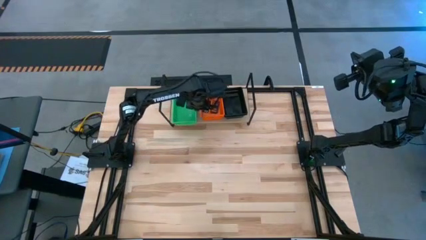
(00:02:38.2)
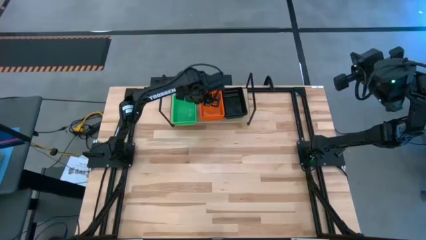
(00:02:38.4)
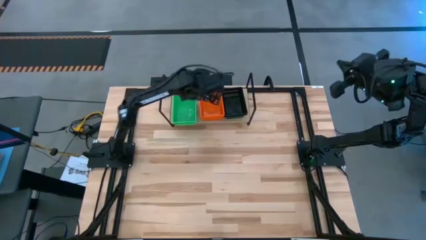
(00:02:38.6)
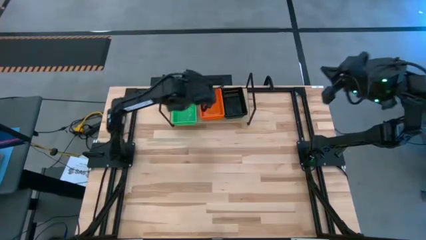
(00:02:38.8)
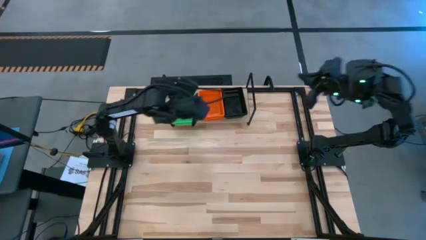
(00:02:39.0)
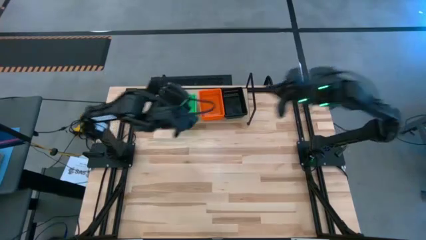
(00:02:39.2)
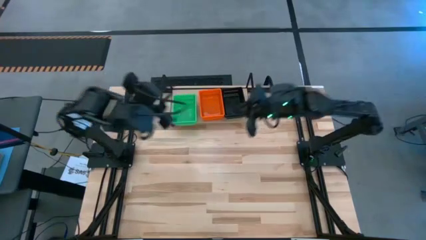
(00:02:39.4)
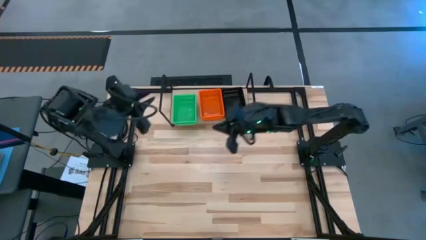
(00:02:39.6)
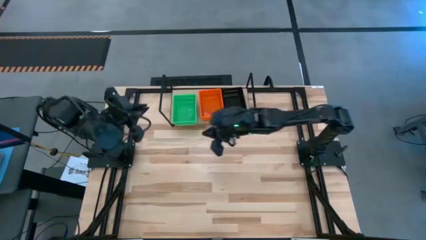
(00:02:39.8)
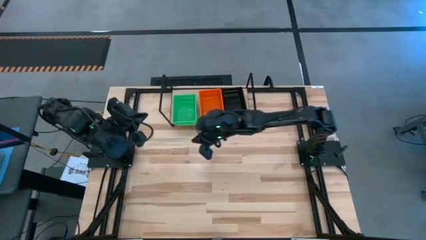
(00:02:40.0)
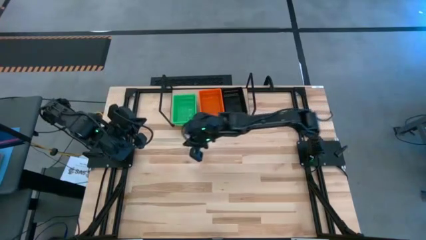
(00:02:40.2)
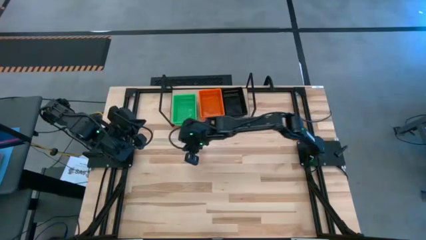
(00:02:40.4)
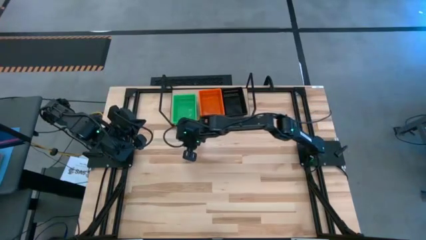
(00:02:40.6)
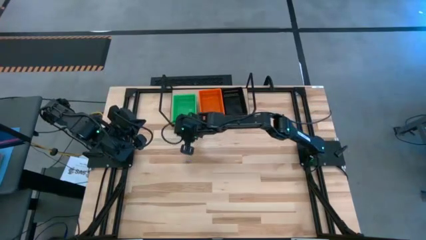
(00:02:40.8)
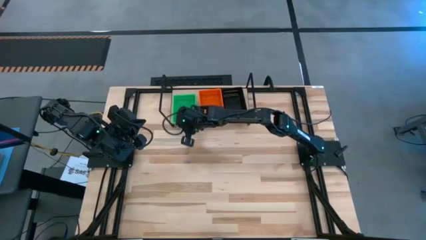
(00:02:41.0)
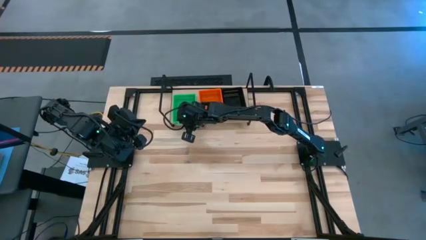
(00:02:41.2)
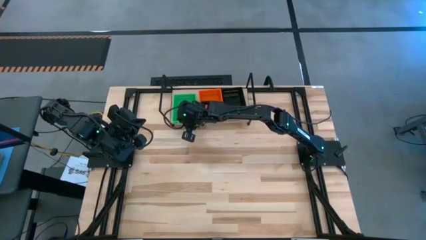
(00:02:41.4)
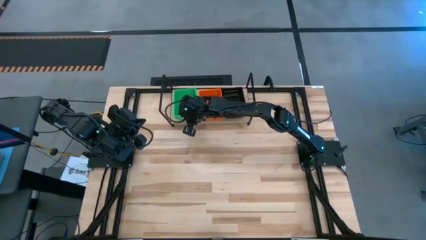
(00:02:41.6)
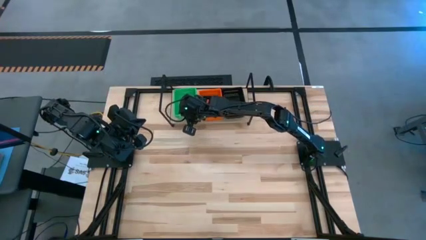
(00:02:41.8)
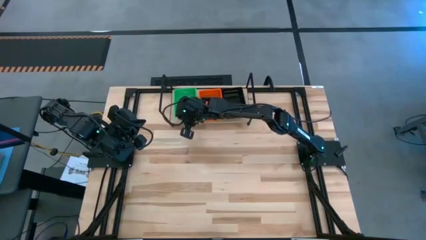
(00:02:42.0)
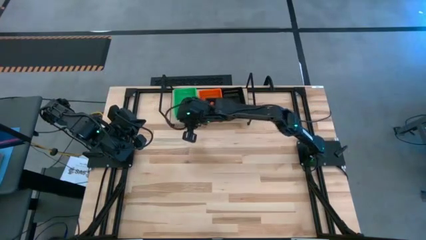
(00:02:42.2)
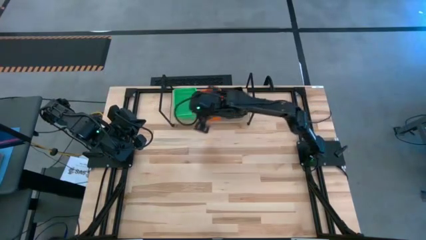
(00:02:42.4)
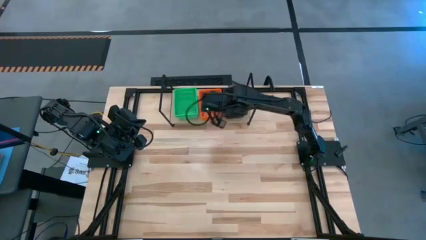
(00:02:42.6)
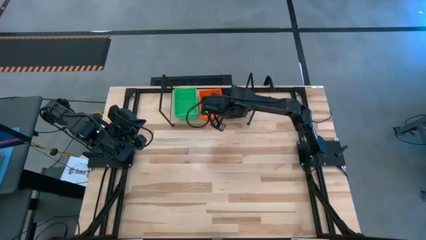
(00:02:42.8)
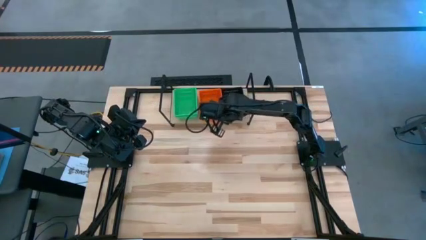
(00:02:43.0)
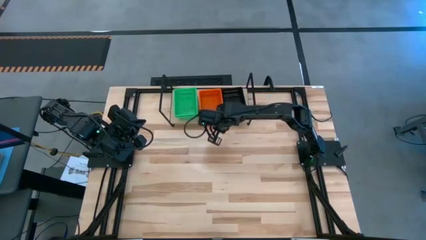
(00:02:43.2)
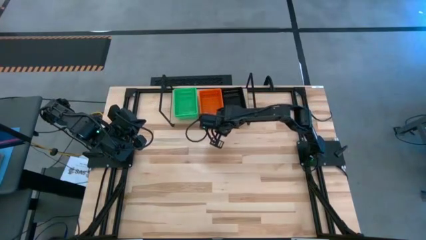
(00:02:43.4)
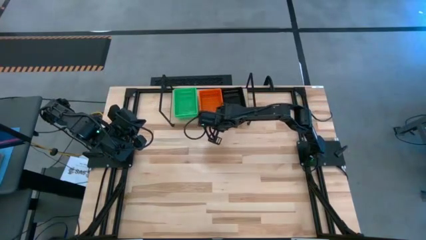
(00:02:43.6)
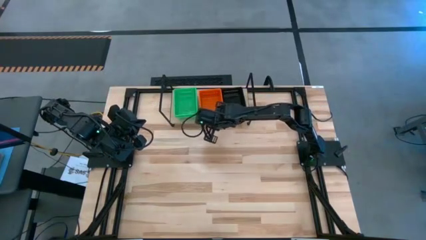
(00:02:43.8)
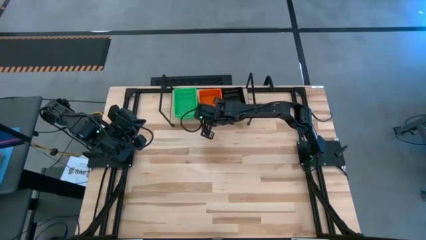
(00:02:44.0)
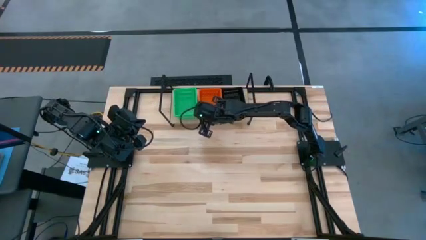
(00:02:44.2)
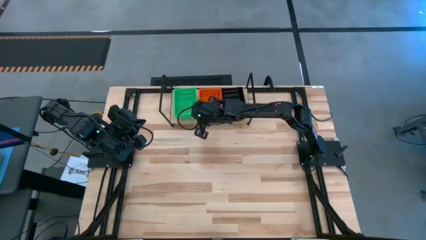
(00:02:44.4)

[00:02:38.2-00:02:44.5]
Task: Stack baskets on shelf by color
Adjust the bins on the shelf

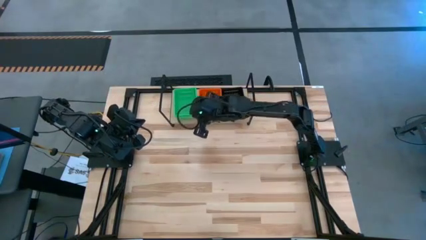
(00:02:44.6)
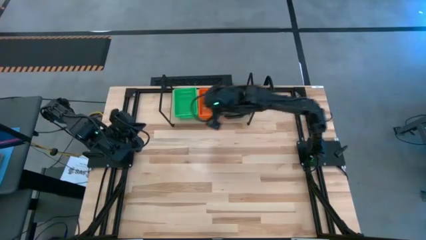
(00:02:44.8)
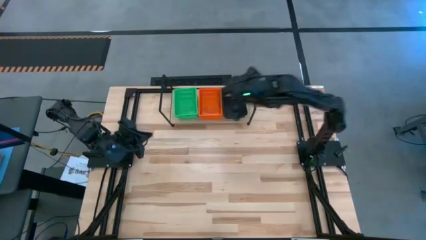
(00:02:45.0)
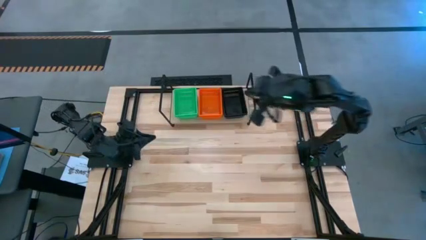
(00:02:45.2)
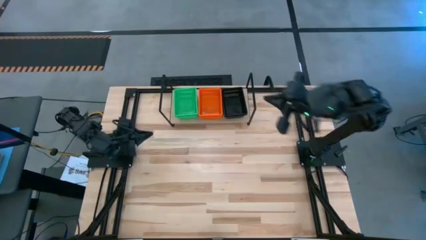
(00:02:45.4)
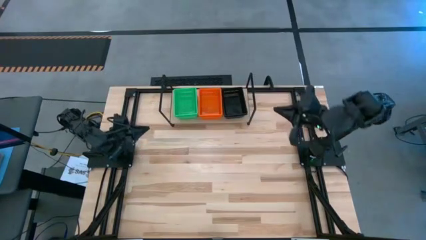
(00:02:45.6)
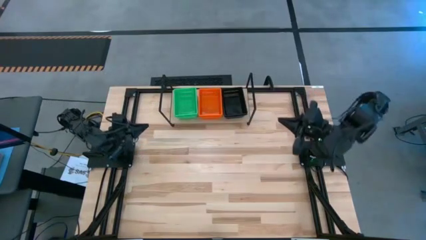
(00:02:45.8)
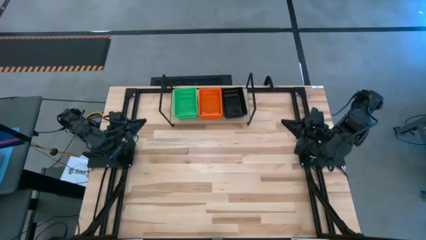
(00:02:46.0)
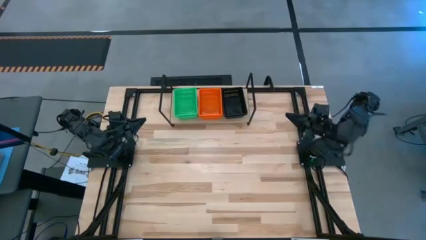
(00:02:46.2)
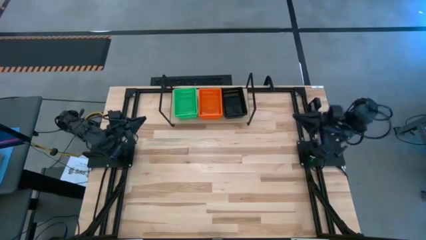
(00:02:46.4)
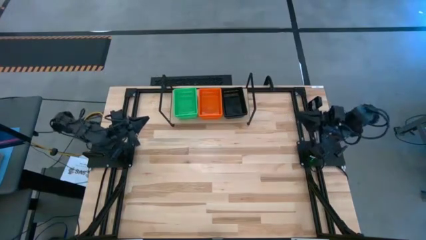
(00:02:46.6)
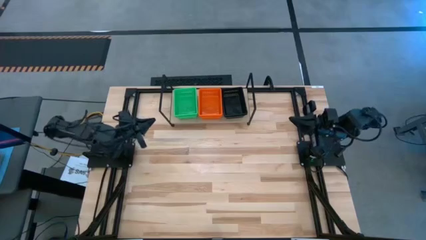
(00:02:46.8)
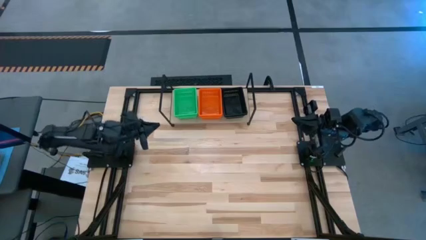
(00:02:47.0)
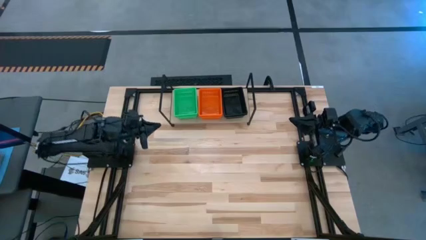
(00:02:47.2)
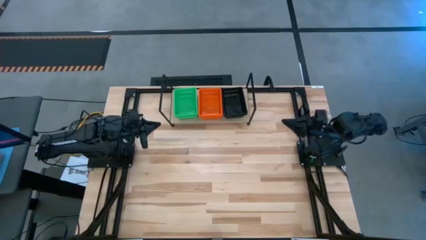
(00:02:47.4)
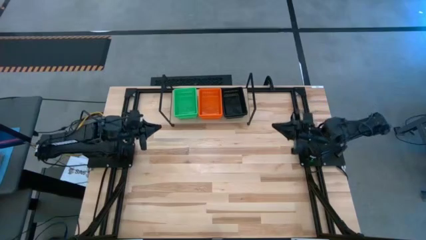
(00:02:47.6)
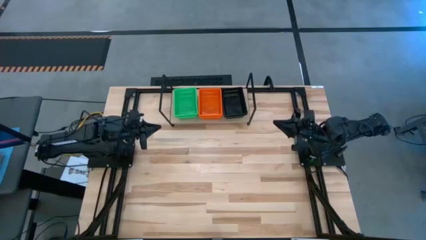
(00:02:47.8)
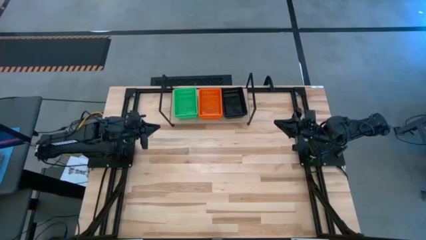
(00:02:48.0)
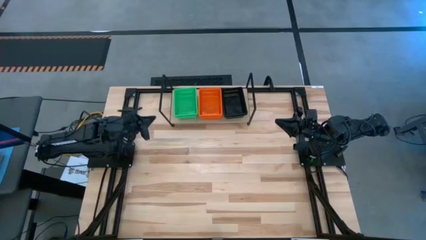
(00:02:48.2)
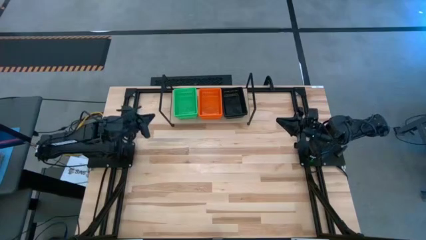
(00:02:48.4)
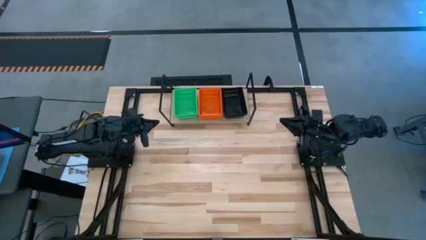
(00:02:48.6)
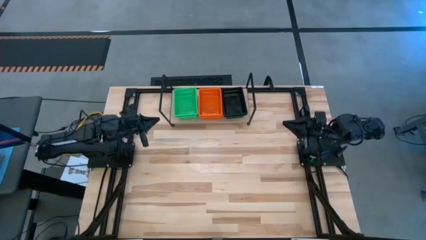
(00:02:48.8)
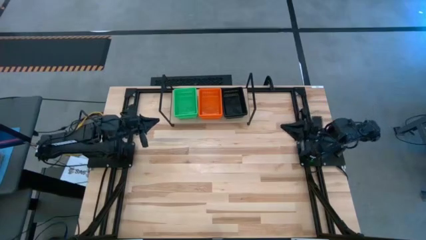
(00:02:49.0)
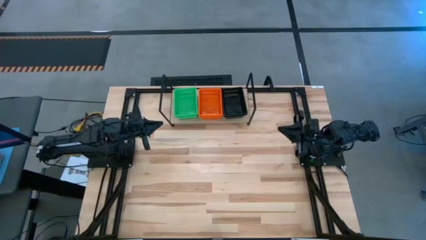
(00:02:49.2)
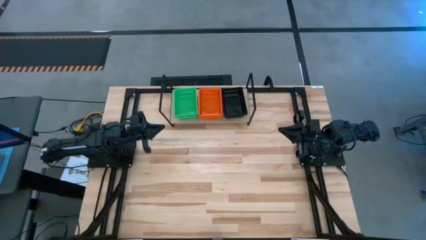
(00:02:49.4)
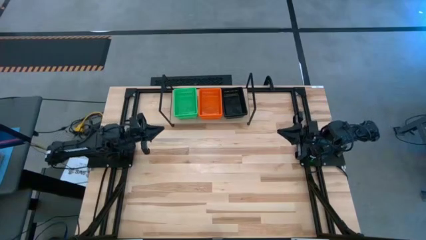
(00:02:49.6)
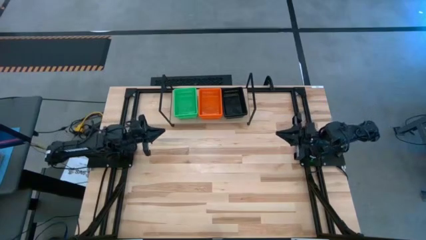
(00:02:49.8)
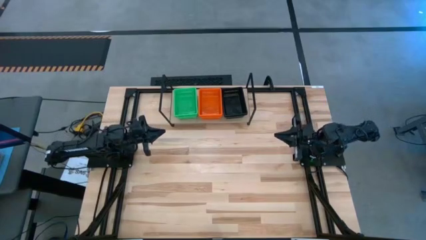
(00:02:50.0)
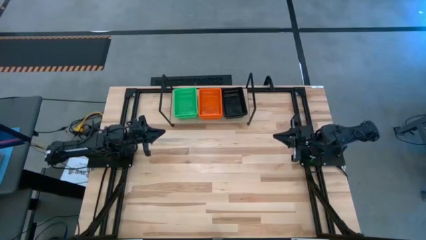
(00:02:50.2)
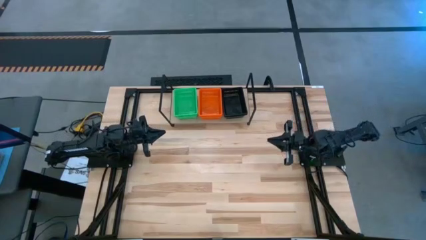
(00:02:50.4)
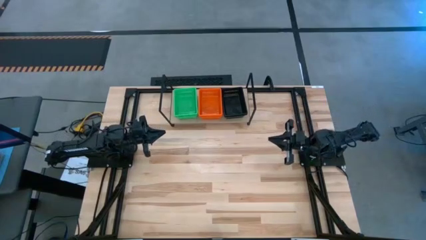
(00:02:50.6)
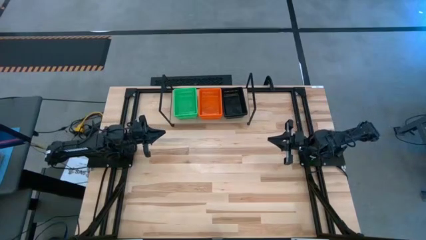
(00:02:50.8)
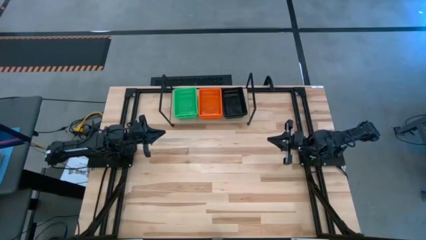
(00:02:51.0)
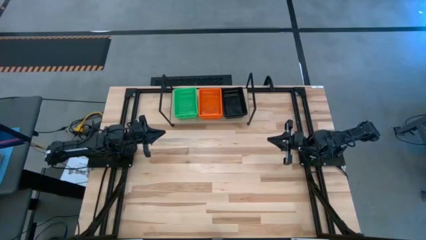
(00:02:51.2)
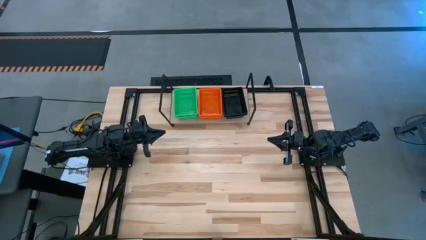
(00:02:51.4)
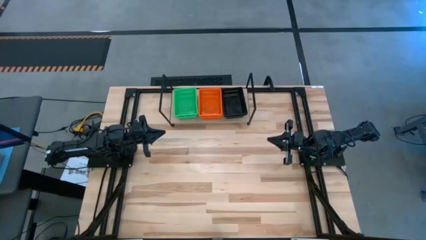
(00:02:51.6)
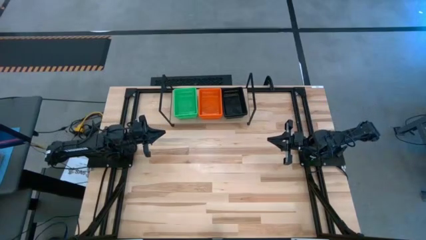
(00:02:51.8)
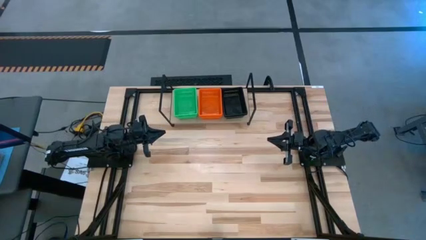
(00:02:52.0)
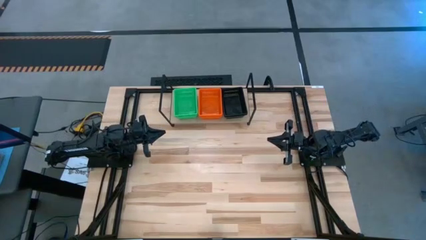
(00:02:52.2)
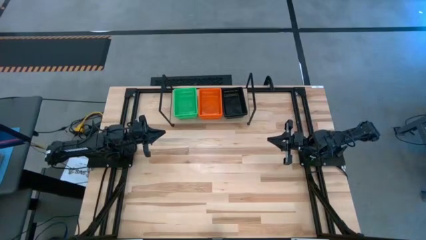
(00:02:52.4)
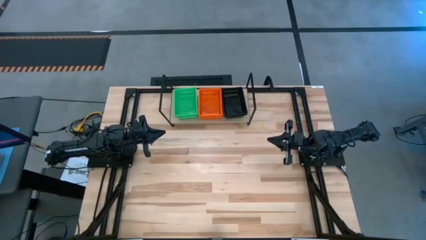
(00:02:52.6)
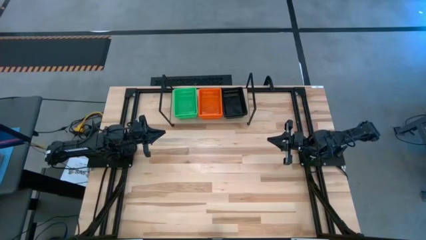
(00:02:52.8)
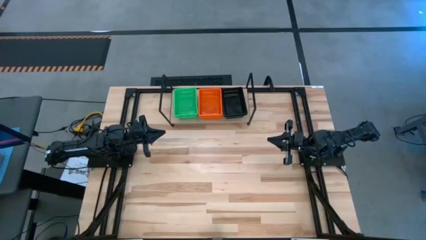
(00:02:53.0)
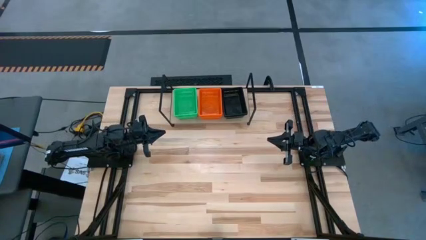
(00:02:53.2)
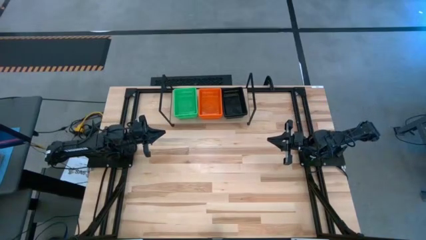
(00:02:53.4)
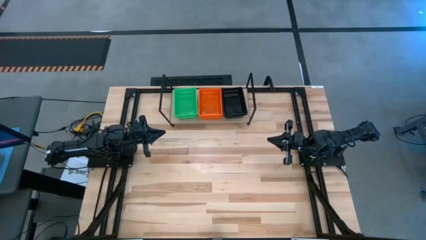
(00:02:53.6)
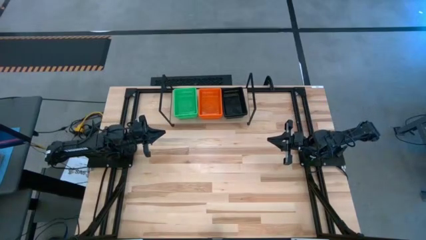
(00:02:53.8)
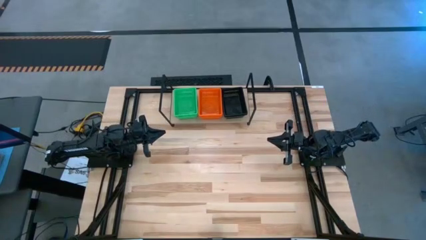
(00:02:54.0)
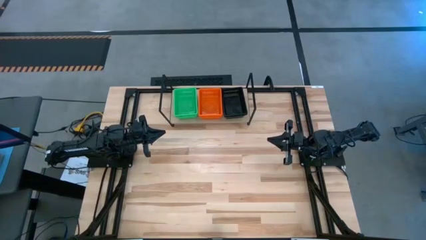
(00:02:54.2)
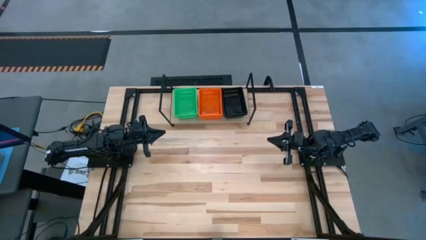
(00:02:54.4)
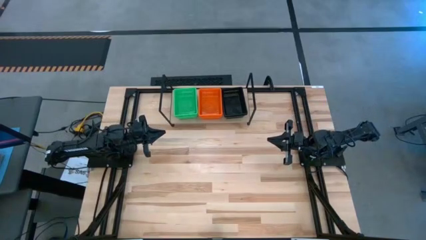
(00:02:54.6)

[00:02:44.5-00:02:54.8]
Return to Home Position
